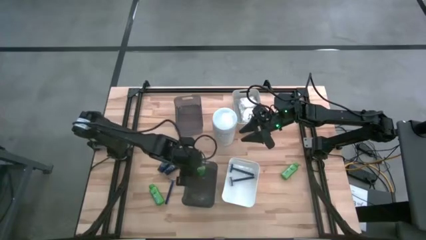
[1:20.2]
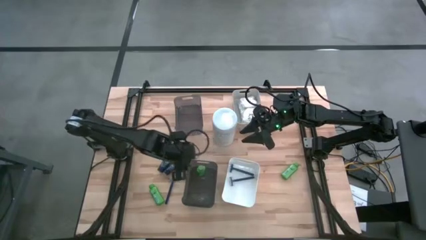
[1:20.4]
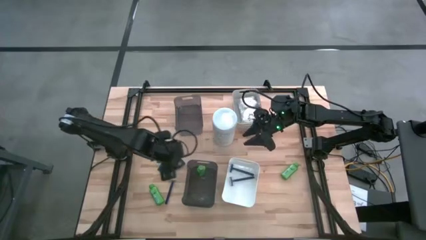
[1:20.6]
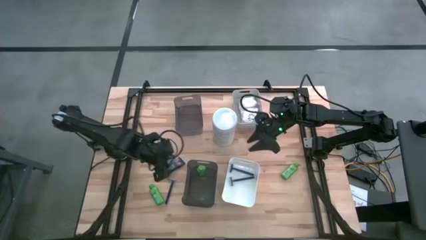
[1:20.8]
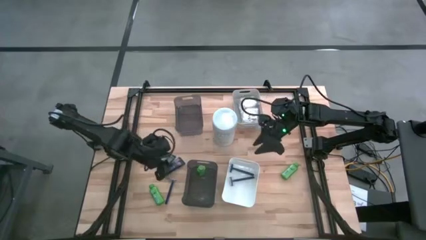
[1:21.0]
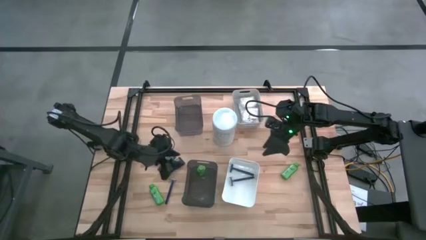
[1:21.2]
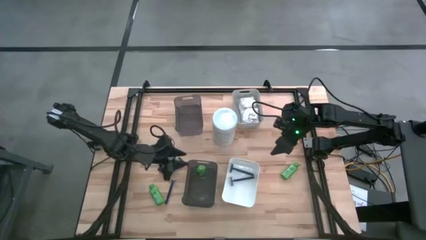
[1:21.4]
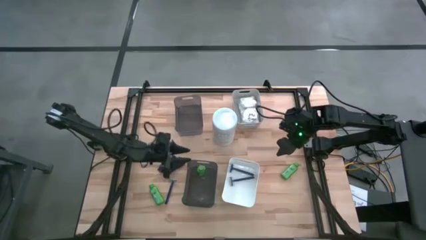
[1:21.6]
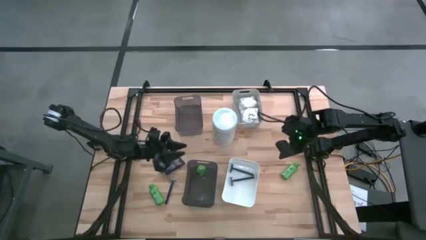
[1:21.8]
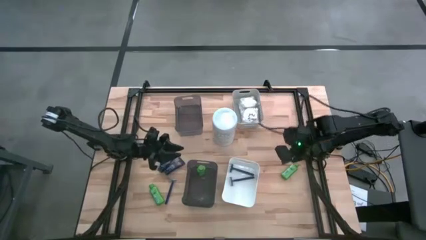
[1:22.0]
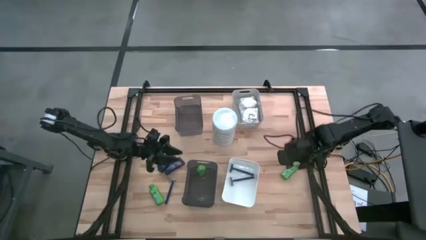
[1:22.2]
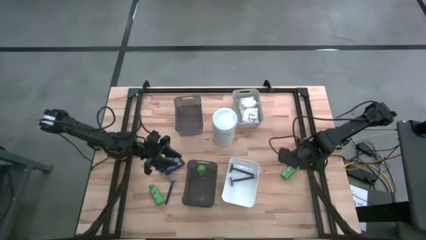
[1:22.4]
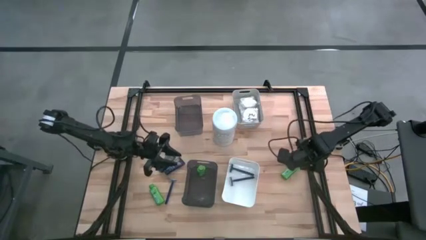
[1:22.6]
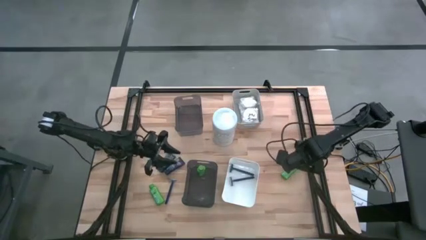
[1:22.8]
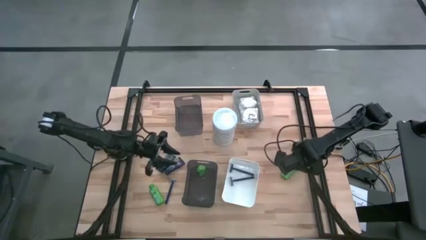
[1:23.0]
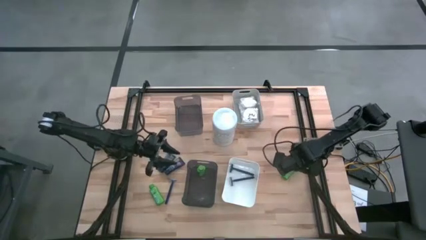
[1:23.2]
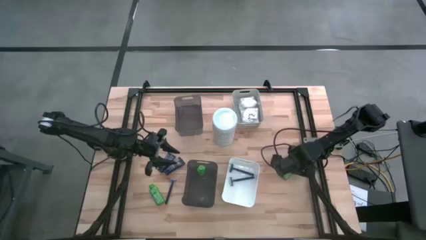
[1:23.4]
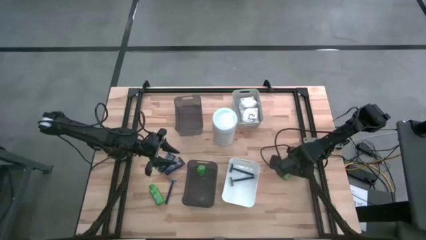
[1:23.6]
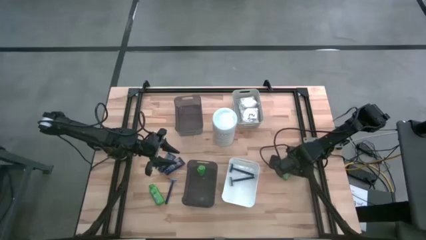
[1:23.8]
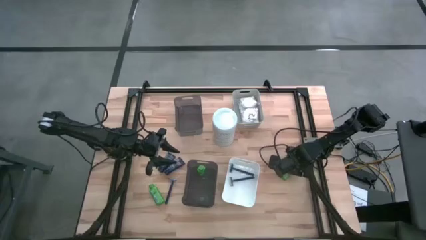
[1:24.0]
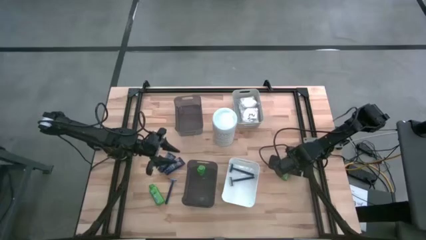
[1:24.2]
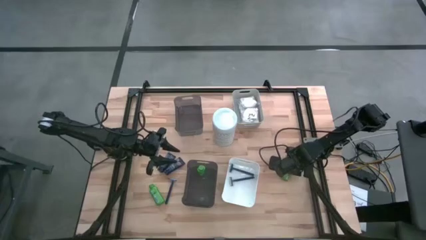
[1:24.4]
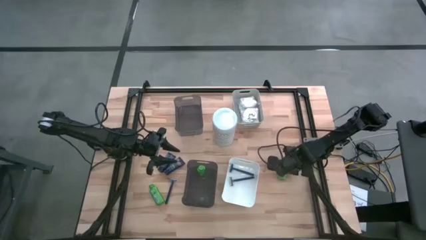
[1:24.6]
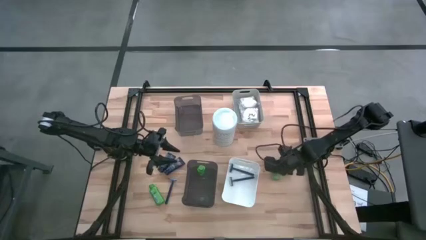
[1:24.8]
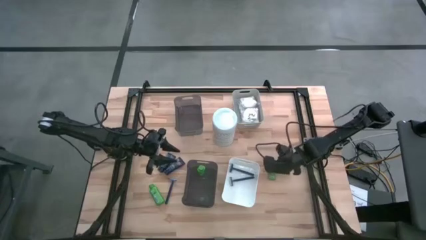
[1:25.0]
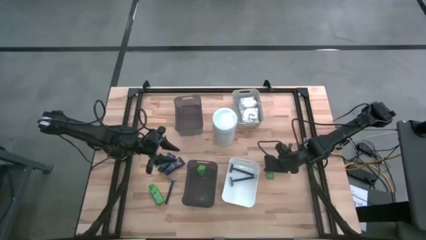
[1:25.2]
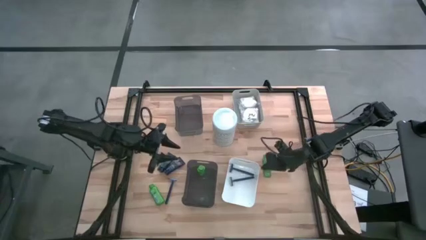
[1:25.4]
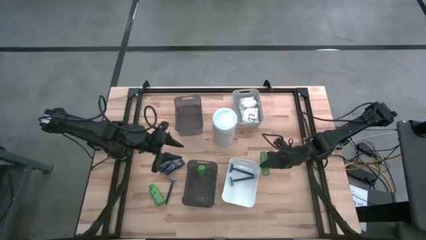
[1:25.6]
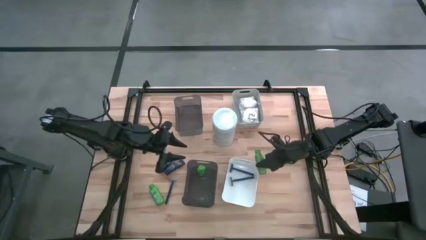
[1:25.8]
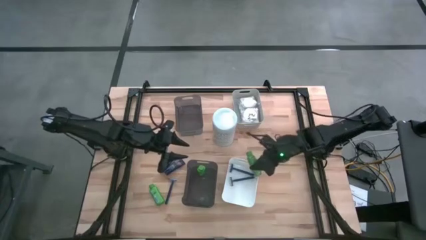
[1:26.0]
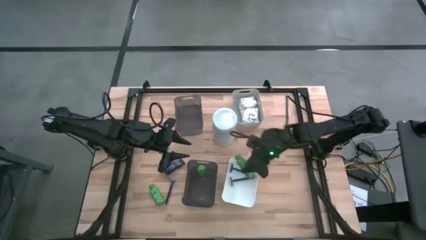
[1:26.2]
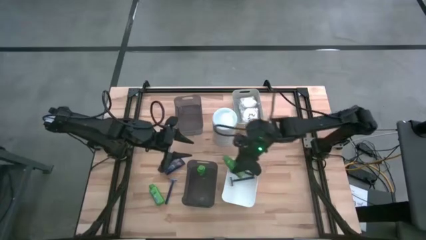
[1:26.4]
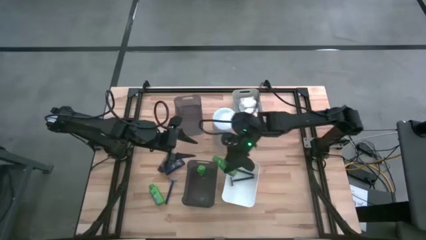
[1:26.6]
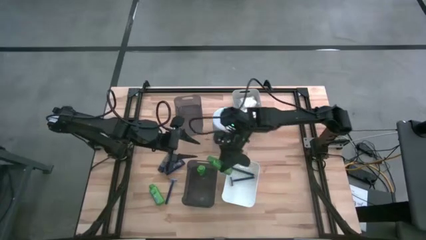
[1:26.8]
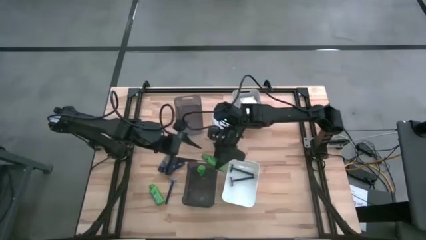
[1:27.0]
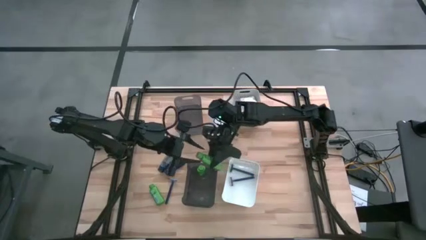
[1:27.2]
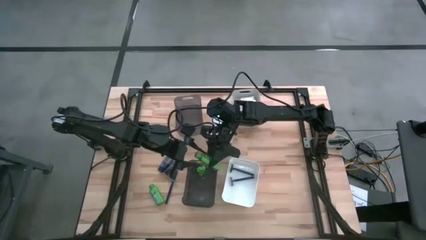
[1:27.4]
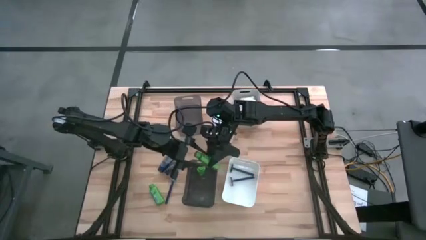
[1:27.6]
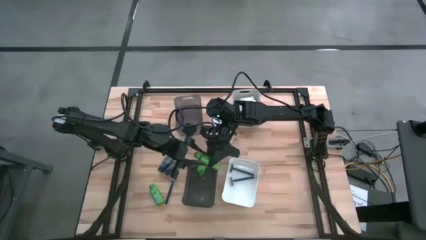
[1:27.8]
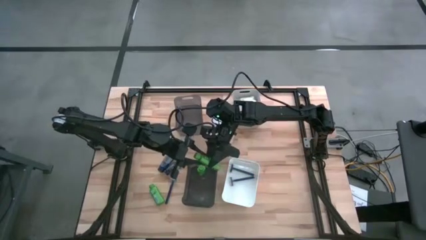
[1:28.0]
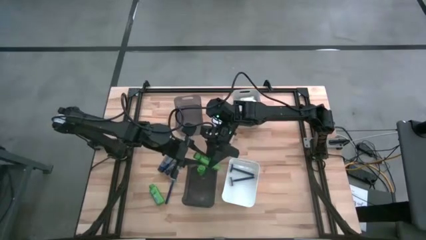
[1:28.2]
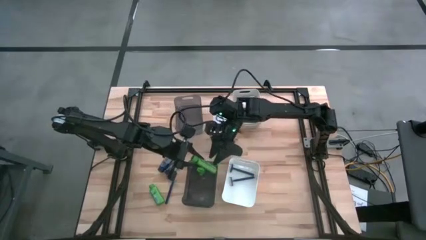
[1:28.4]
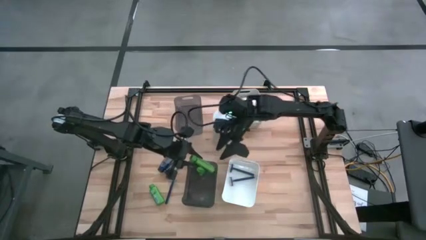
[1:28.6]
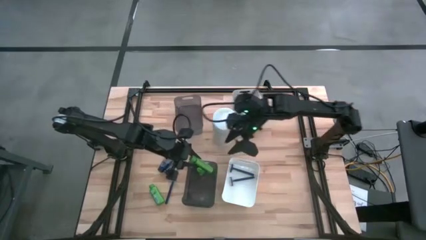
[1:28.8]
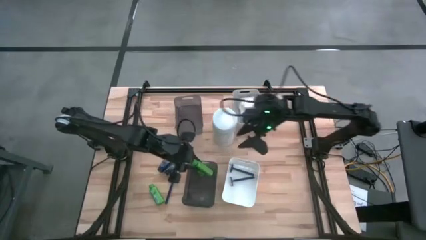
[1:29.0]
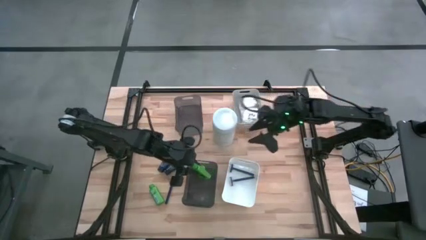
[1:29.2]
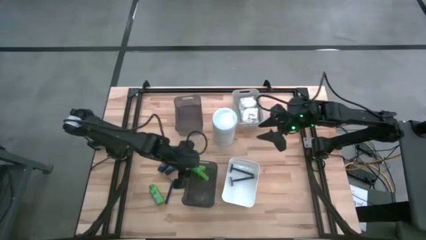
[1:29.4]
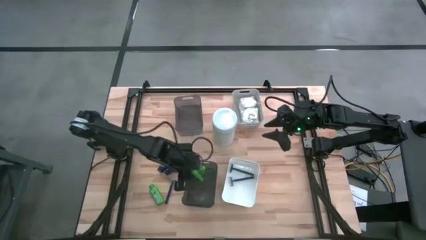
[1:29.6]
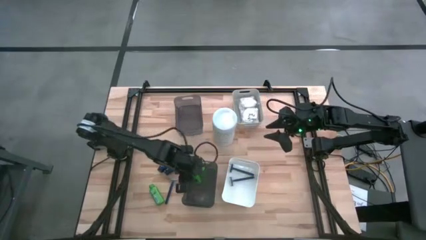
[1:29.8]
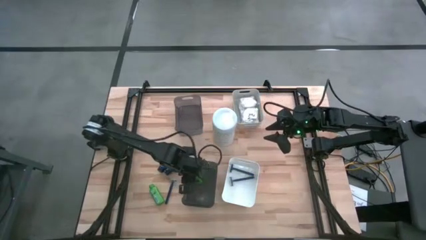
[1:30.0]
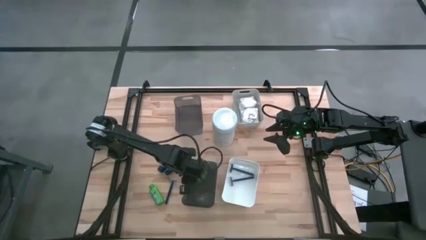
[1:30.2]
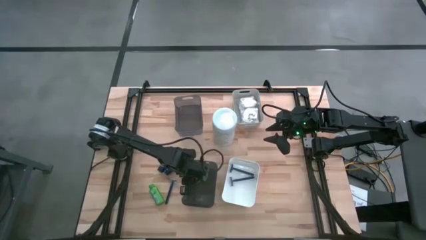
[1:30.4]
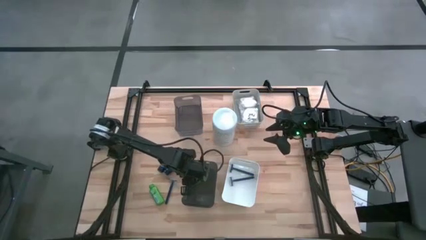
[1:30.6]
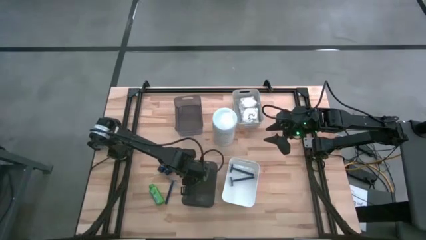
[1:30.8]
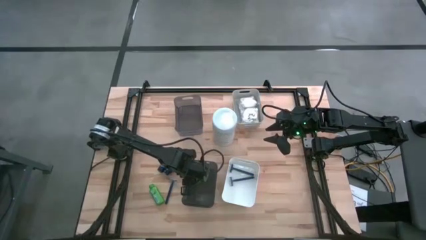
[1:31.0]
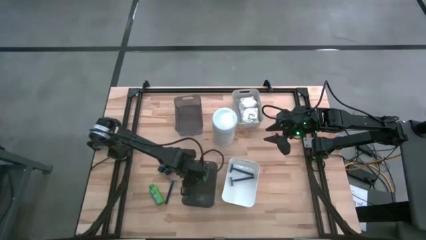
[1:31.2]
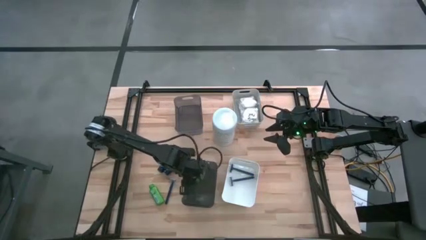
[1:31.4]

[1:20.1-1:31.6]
Task: Pick & Place Travel size toiletries
Put the green shampoo bottle into the bottom black bin

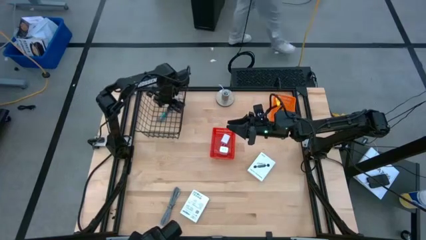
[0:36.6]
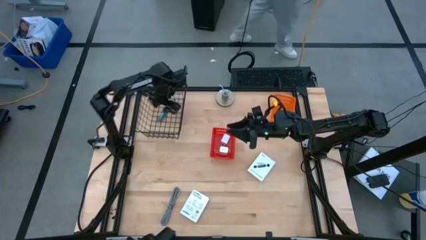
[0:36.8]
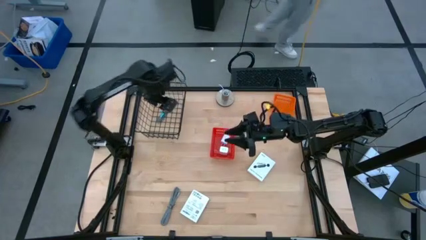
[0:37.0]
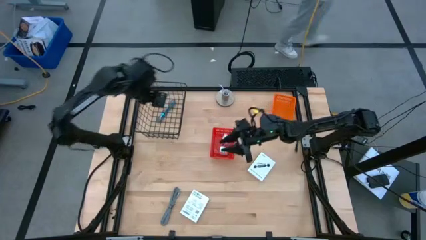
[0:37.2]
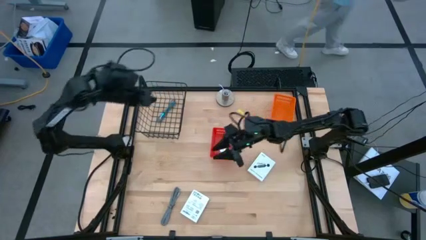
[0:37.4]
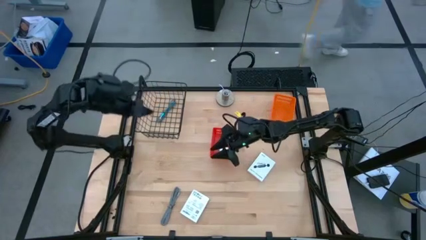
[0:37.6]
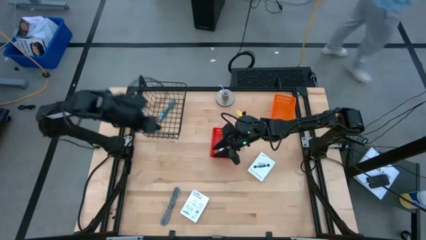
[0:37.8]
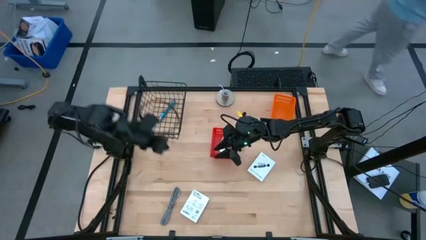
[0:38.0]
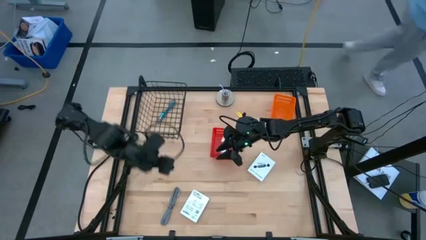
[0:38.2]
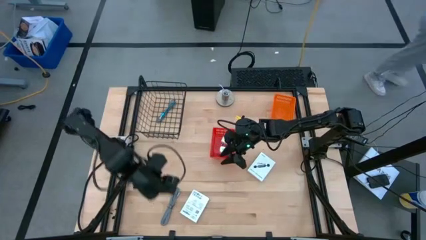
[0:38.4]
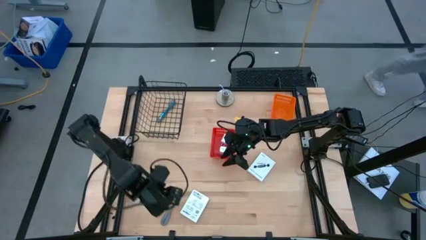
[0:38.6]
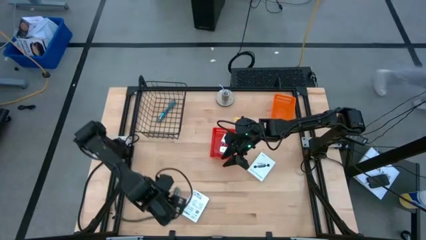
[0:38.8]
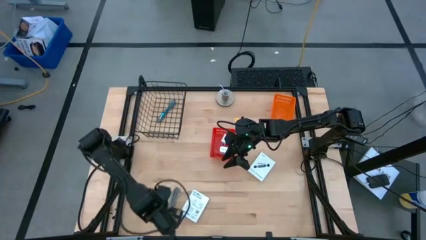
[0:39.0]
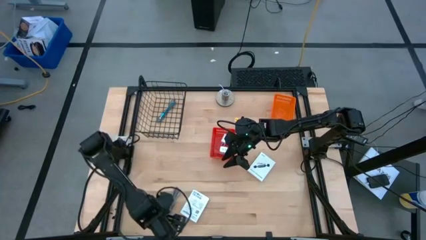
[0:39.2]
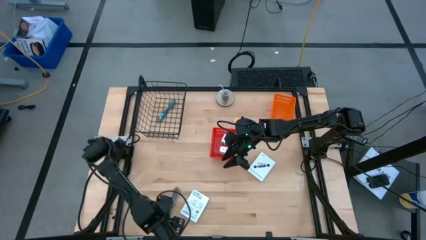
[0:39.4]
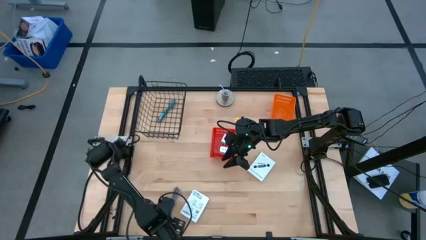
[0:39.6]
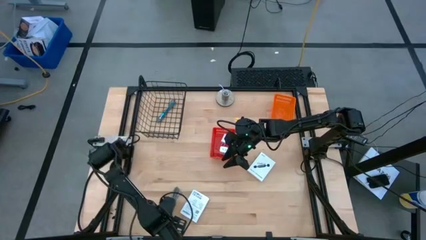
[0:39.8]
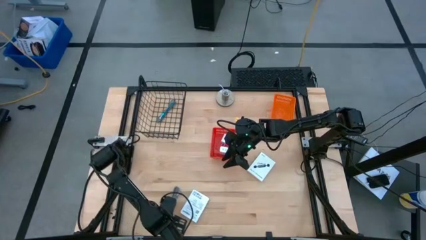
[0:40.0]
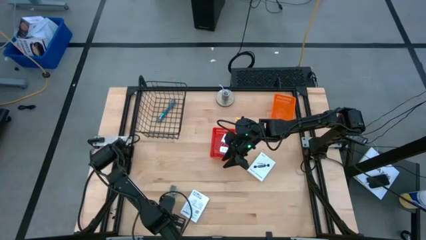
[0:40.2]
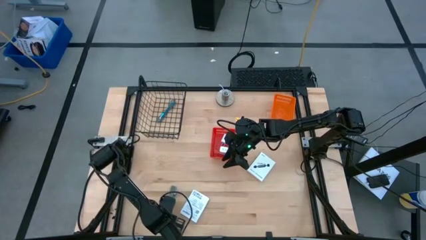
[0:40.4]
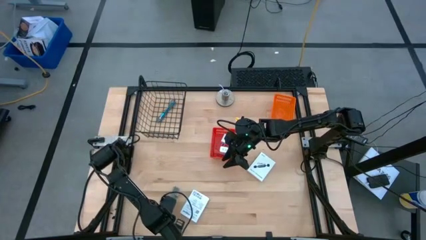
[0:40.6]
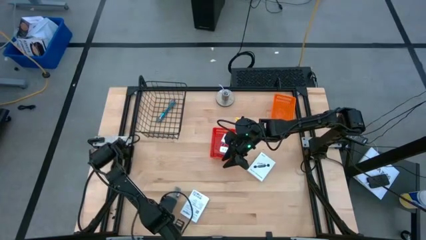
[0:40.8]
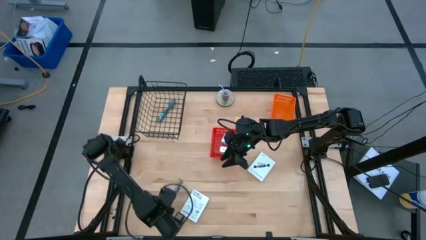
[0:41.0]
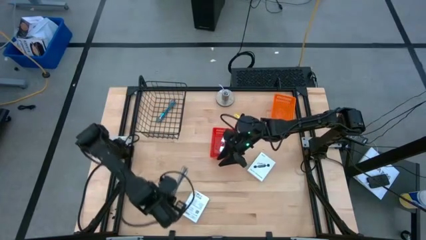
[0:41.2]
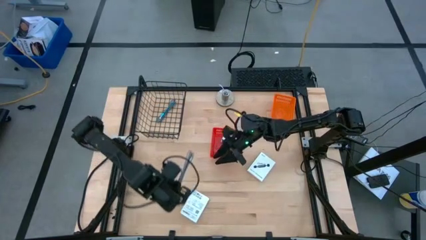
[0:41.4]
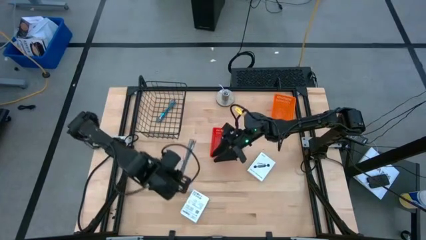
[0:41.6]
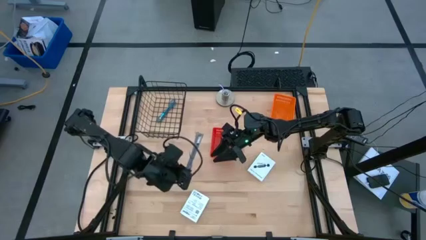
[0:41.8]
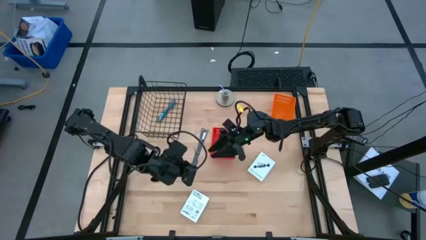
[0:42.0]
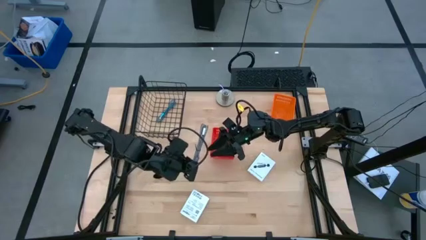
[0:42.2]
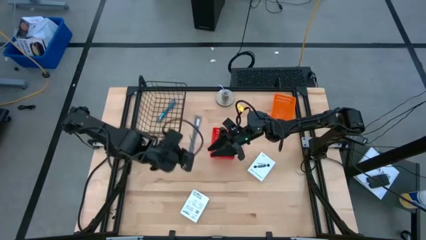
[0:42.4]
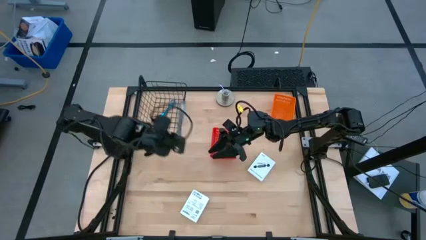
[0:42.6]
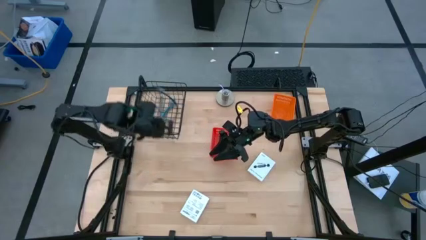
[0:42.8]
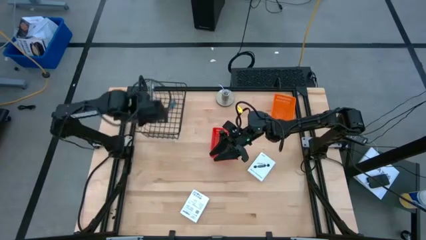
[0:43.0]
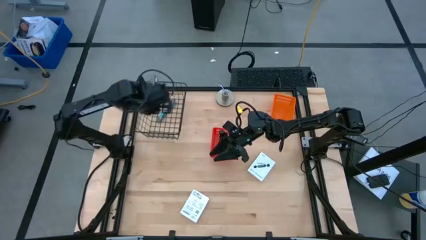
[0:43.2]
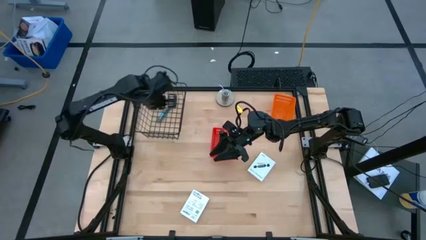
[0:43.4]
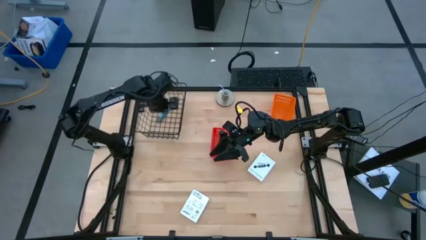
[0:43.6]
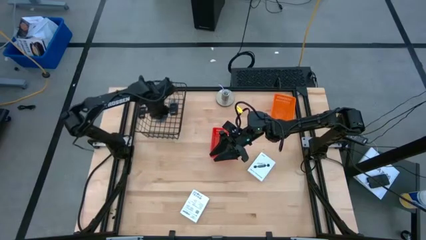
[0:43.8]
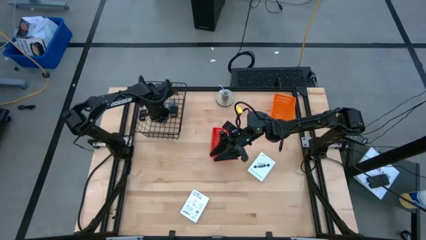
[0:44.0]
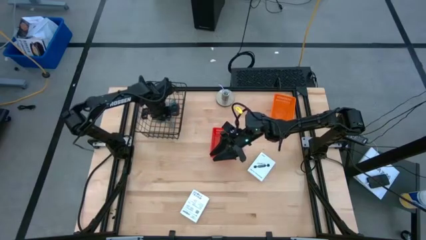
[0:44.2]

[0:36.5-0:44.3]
Task: Pick and place items into bin
Put the white charger cable into the wired basket
